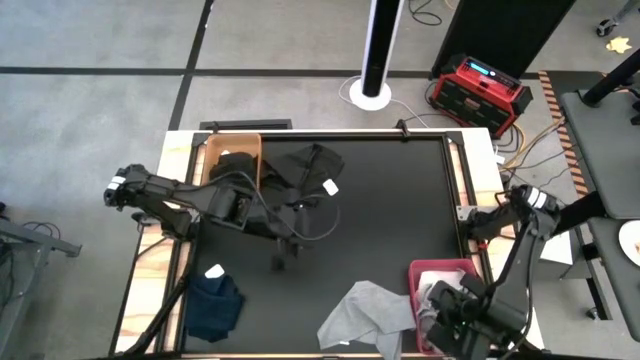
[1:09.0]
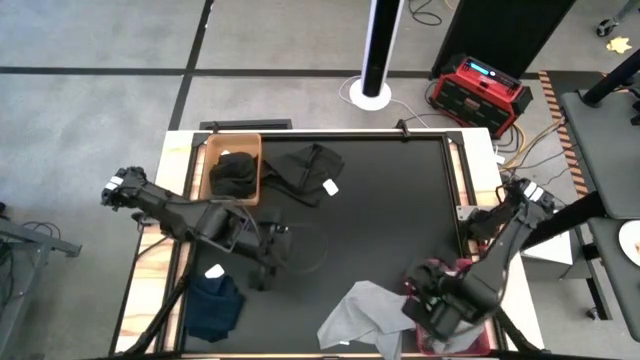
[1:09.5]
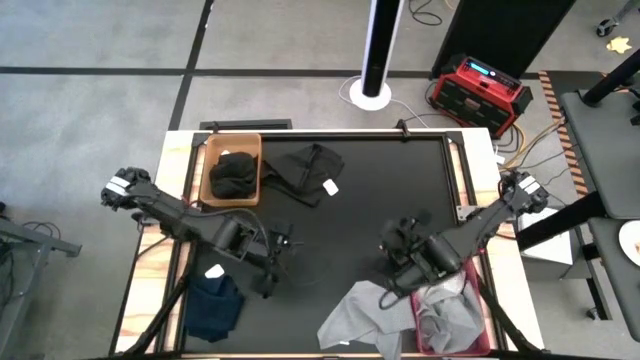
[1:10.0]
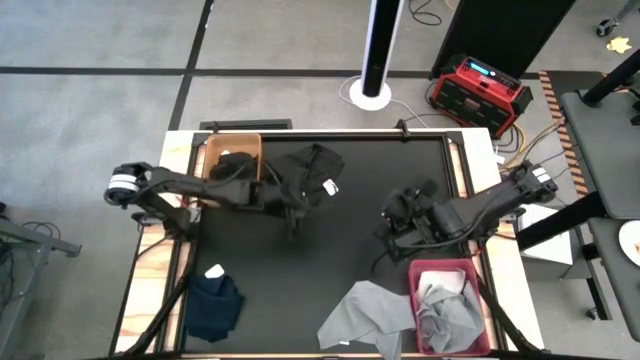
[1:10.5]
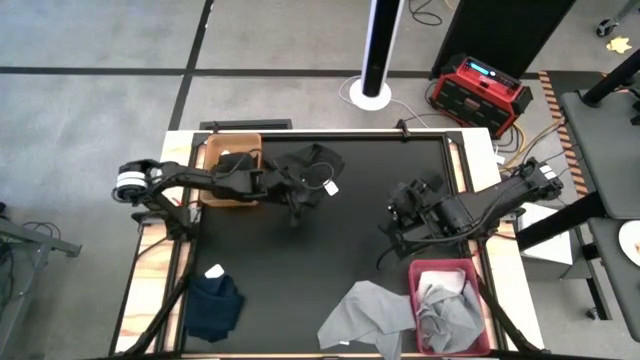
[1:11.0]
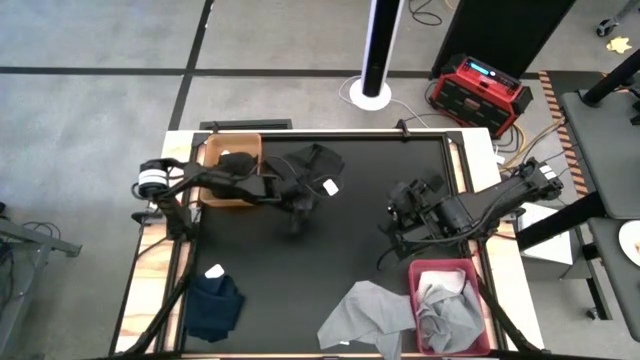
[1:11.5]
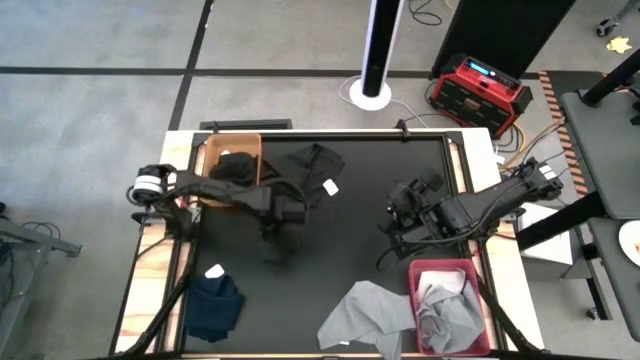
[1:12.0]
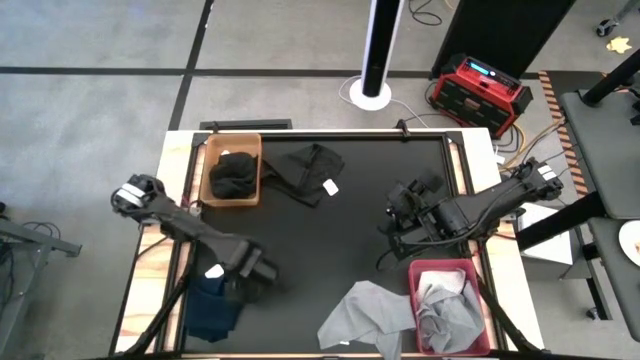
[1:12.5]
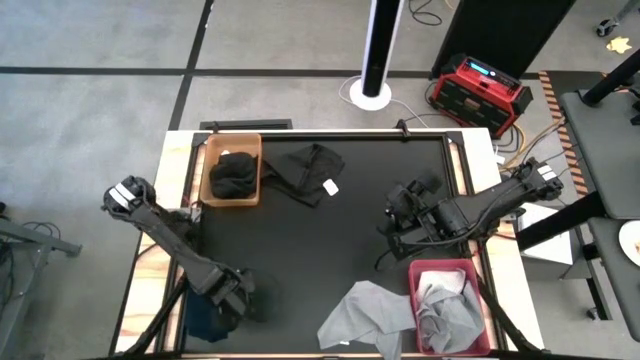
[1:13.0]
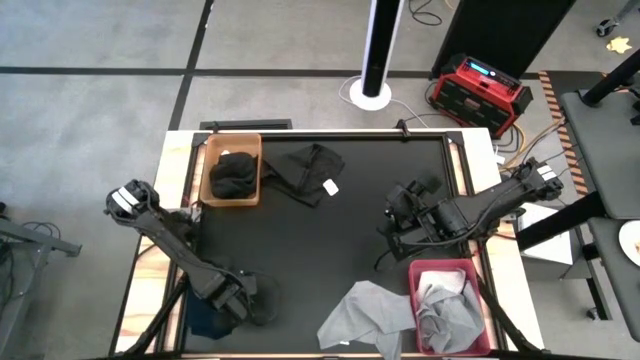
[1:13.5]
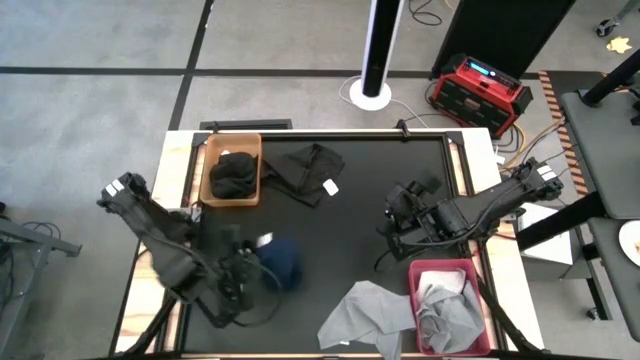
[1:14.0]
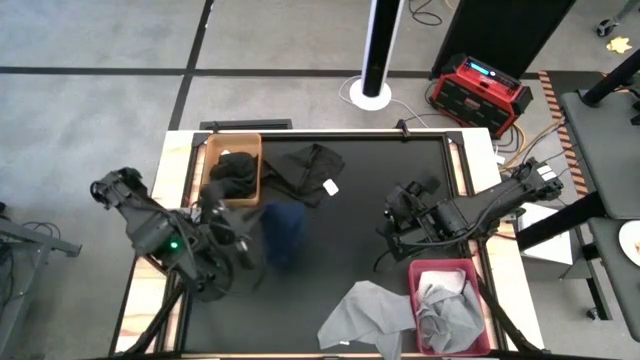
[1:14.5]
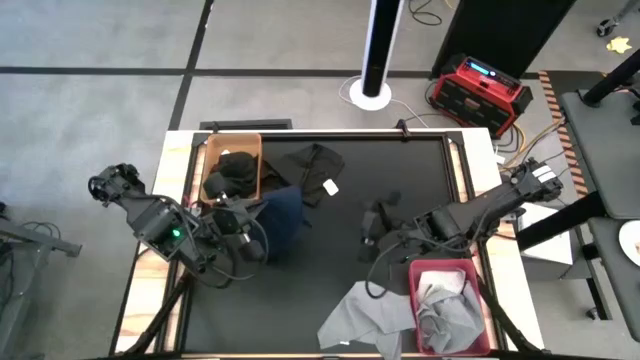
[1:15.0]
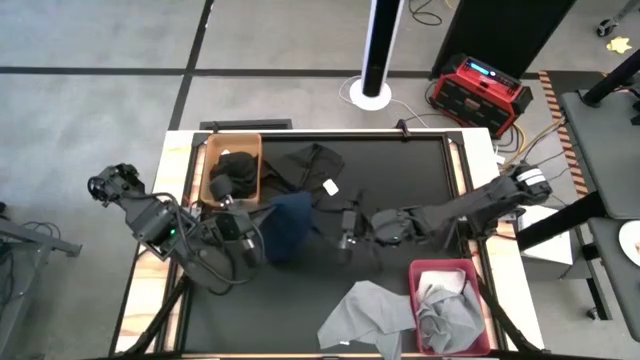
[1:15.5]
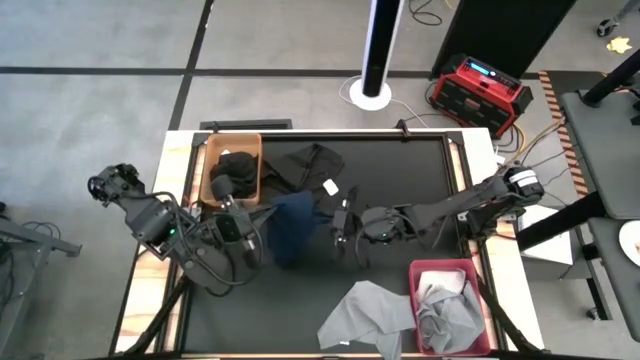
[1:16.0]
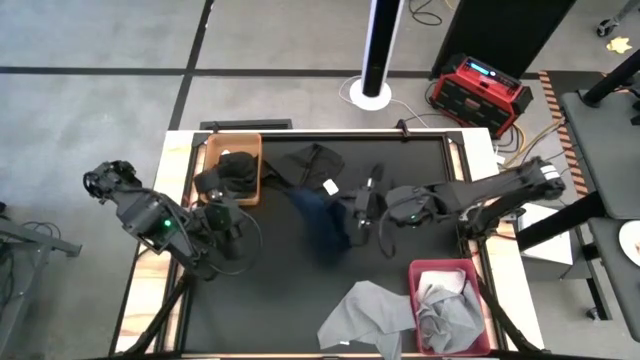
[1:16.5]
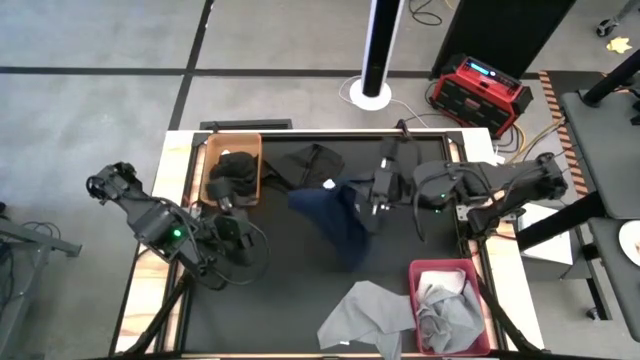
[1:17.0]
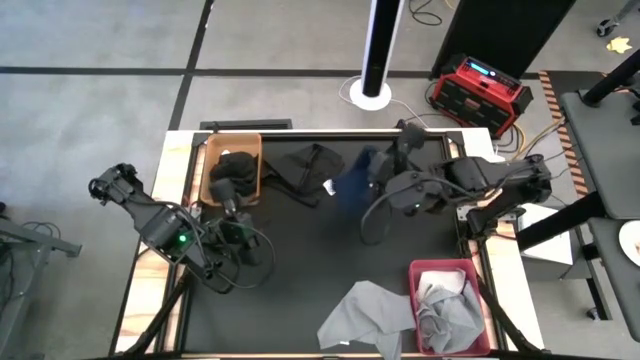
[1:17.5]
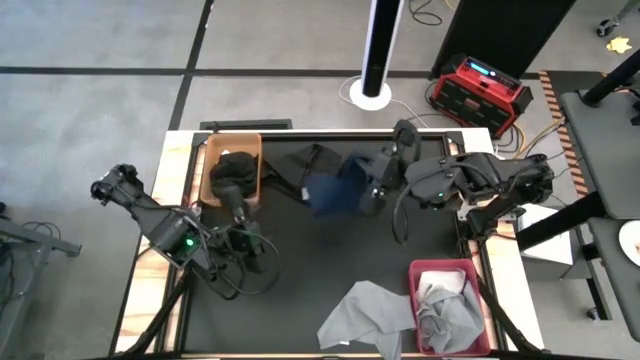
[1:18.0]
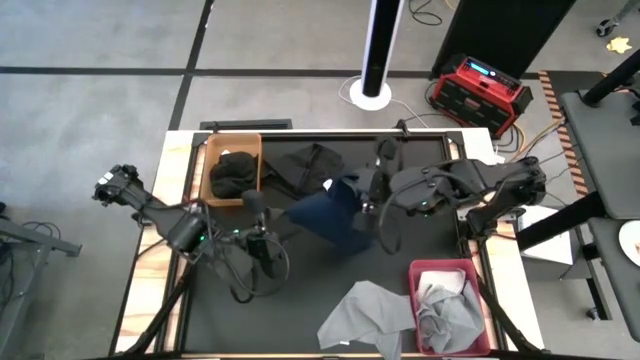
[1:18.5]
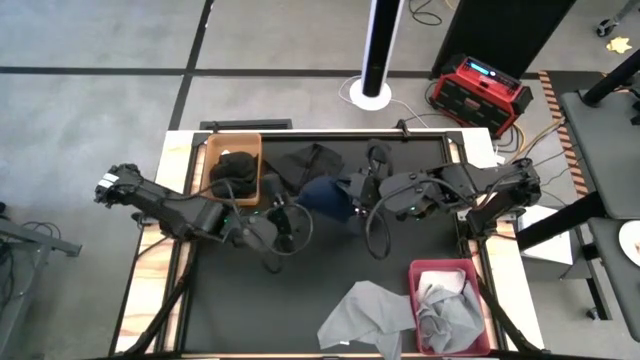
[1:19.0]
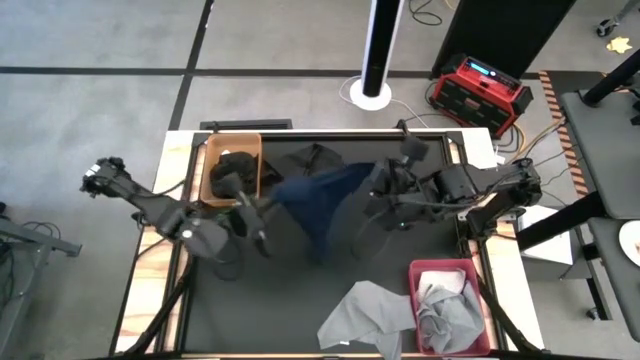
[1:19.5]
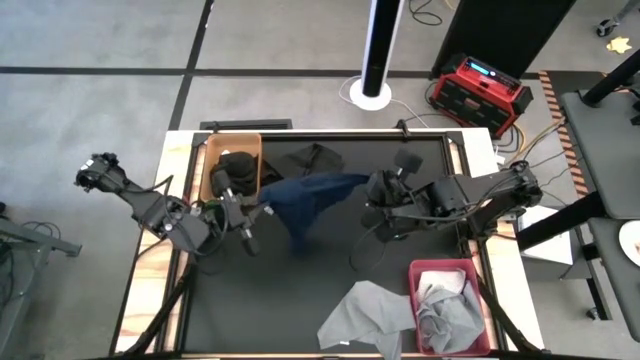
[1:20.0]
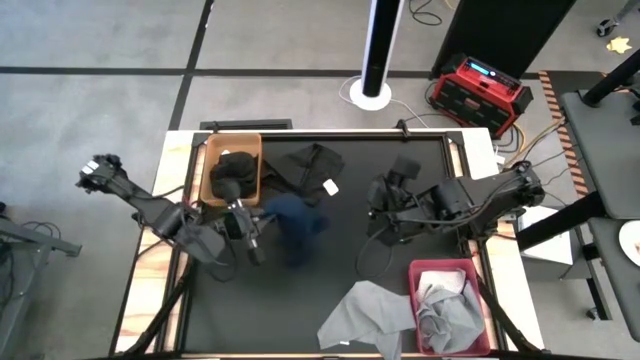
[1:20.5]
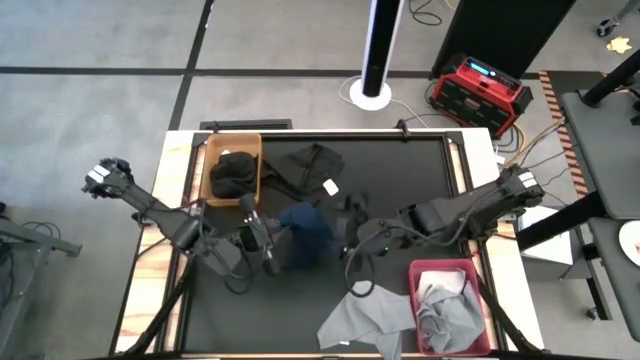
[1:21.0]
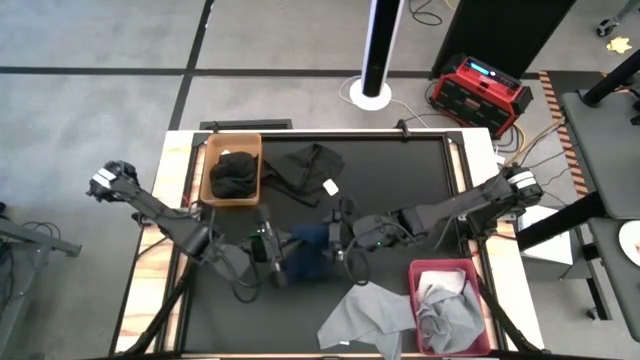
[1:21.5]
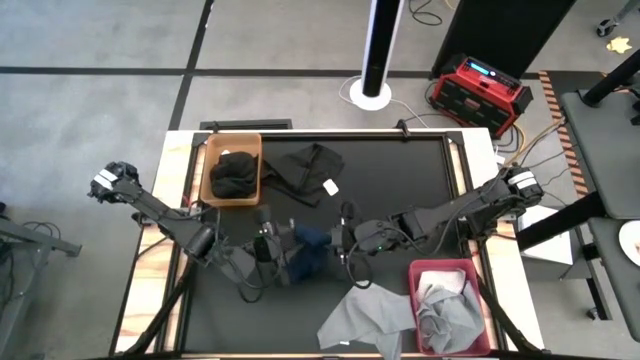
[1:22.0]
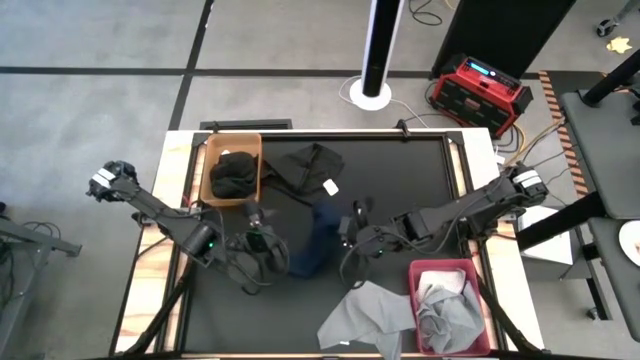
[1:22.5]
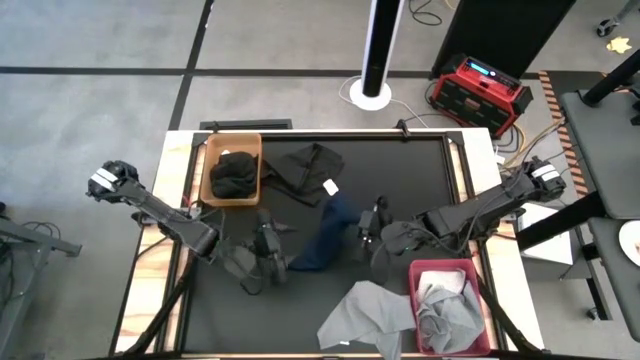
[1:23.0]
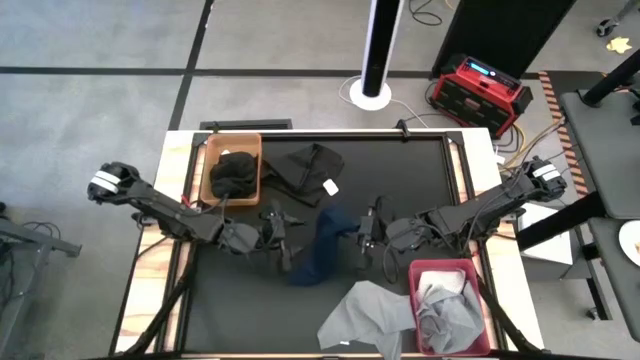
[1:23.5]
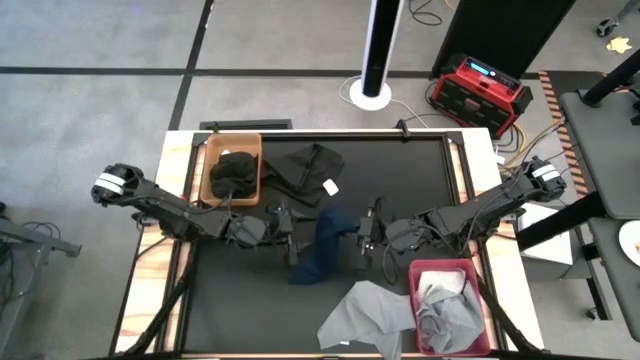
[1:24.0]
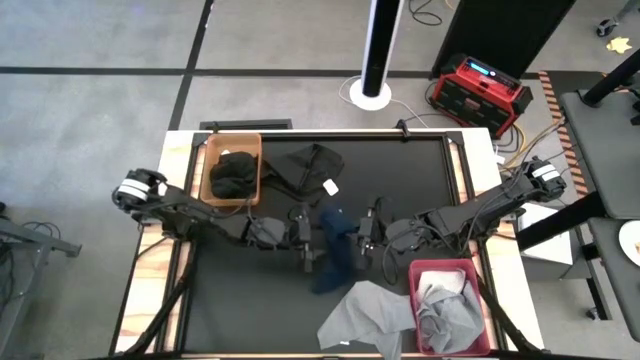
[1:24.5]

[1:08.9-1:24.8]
Task: Sort towels by color in basket
Put the dark blue towel into the orange bin

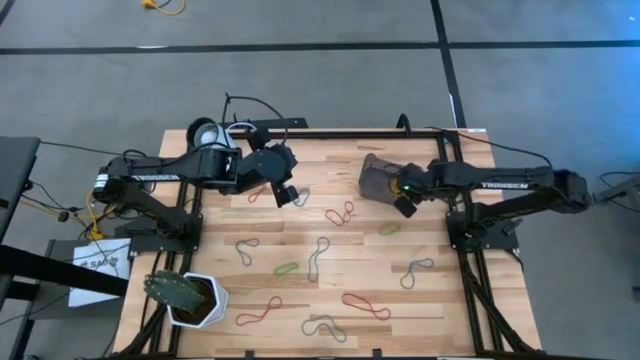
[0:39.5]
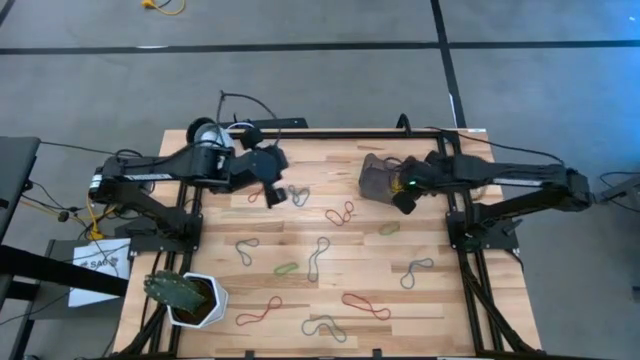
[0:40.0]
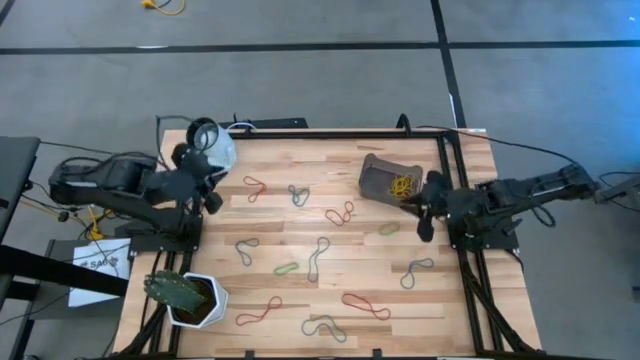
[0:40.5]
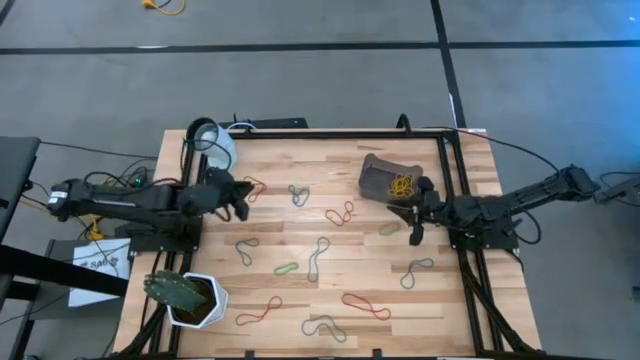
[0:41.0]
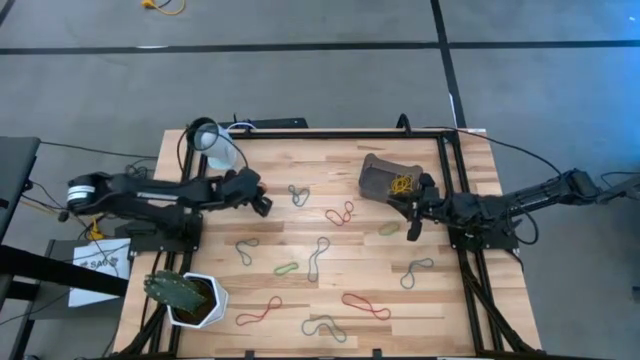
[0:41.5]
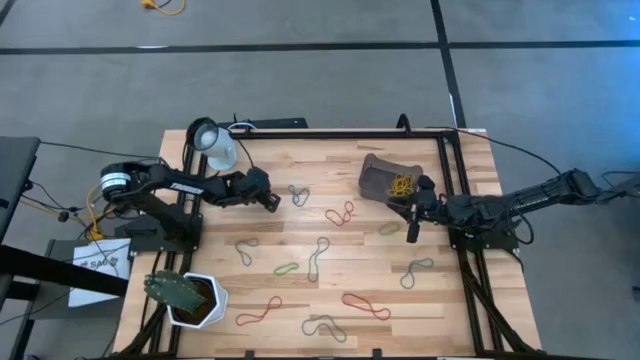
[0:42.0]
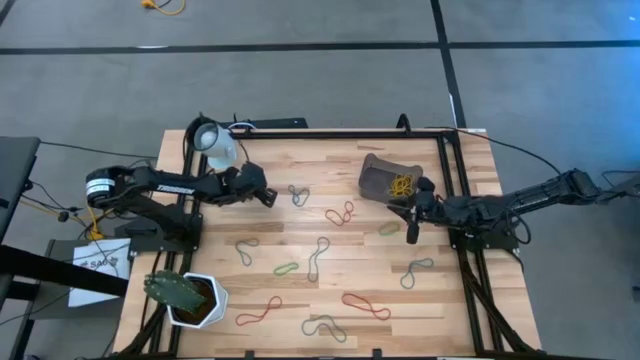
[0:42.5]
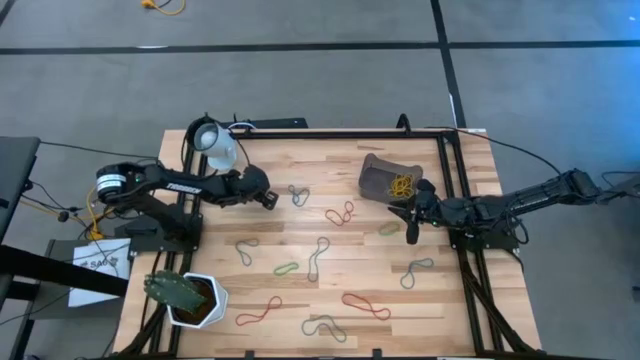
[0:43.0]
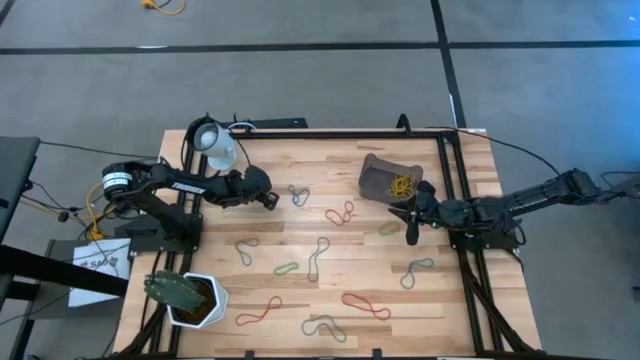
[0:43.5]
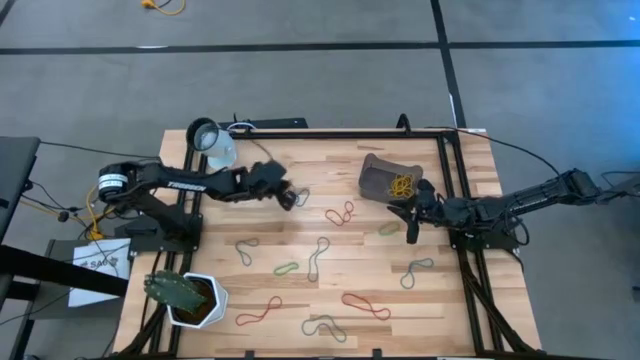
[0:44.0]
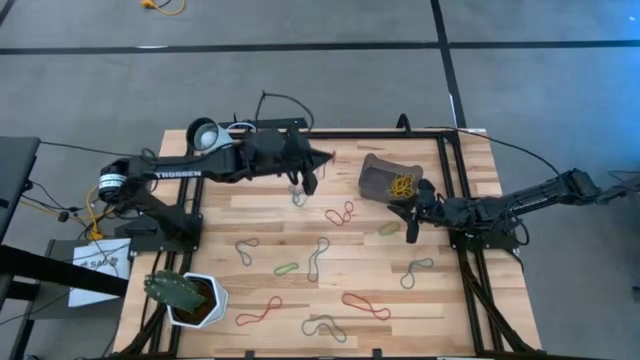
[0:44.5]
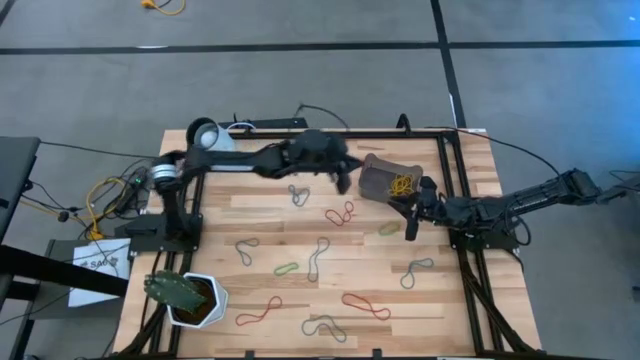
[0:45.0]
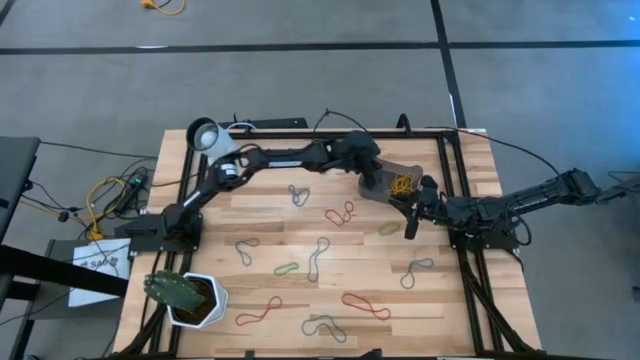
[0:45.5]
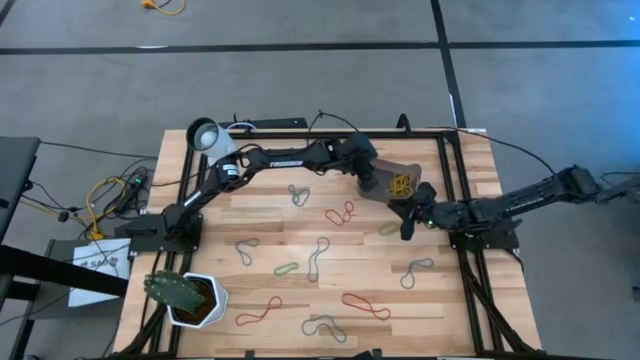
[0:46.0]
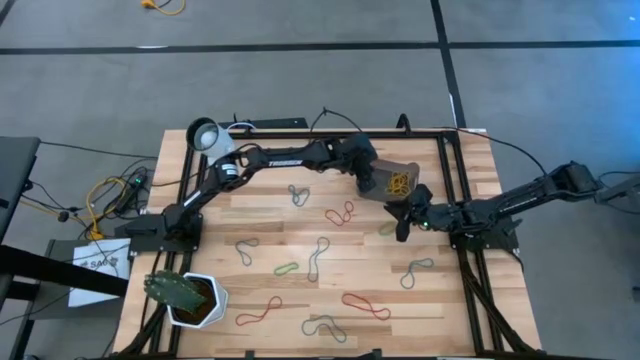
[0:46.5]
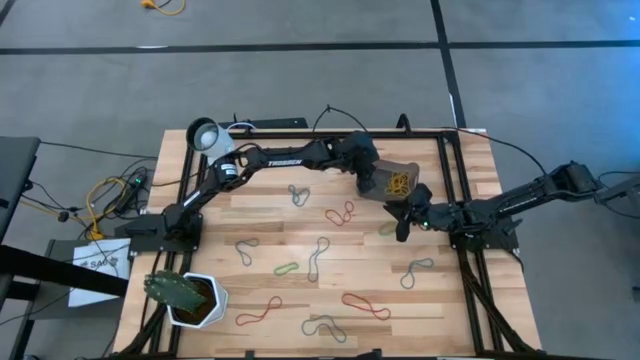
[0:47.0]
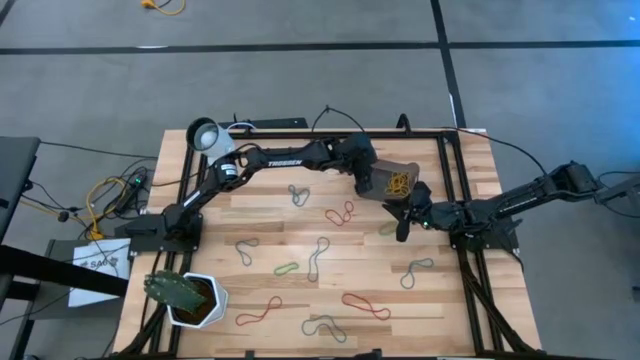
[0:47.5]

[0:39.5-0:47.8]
Task: Pick and place rubber bands into bin
Put the red rubber band into the black container
